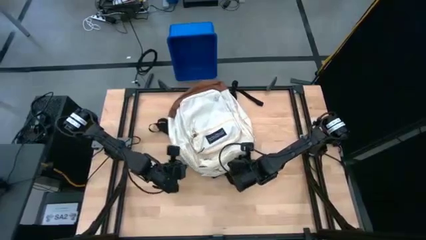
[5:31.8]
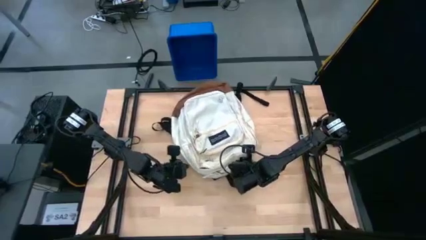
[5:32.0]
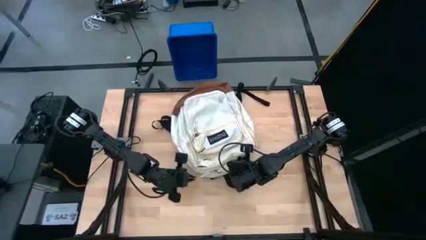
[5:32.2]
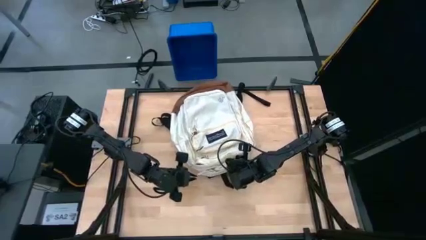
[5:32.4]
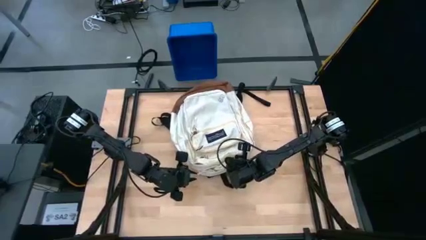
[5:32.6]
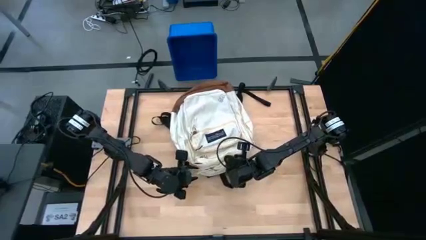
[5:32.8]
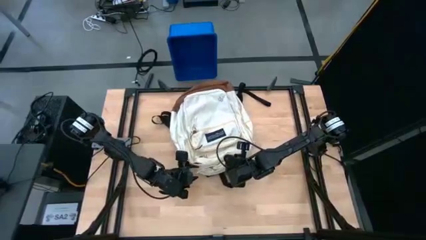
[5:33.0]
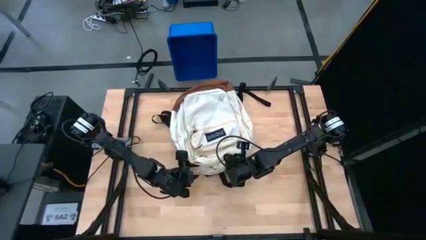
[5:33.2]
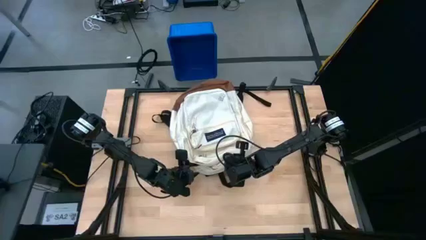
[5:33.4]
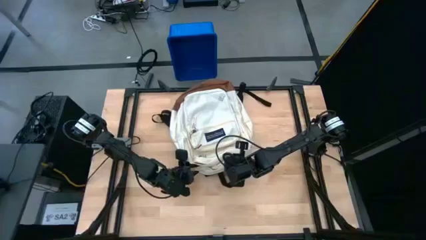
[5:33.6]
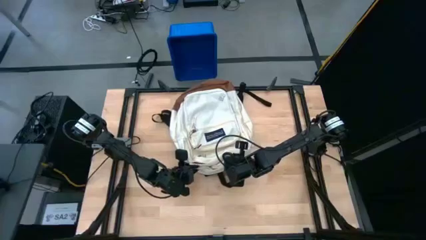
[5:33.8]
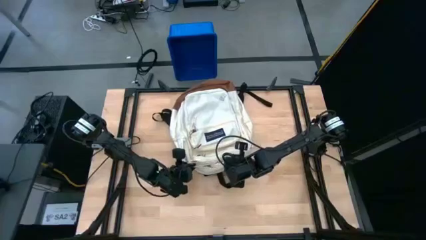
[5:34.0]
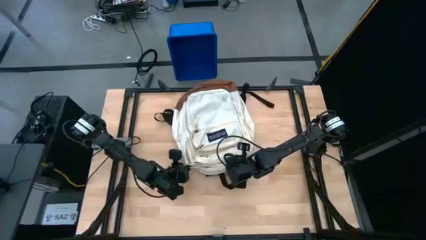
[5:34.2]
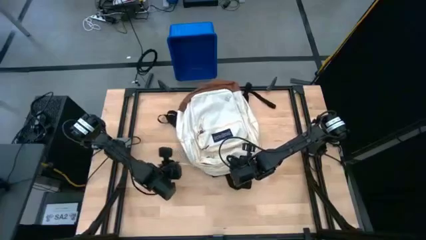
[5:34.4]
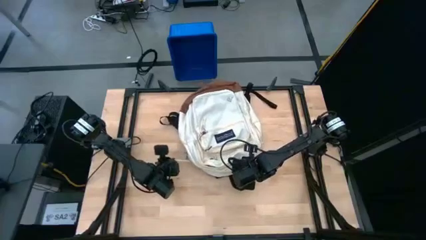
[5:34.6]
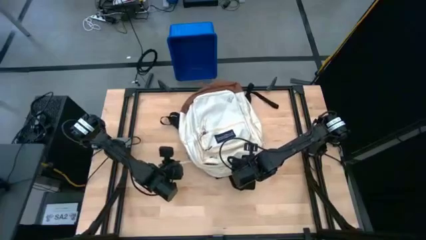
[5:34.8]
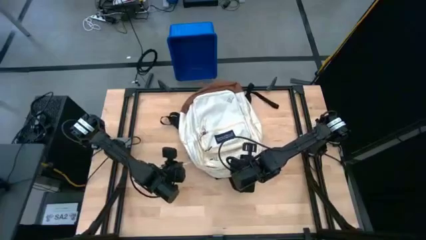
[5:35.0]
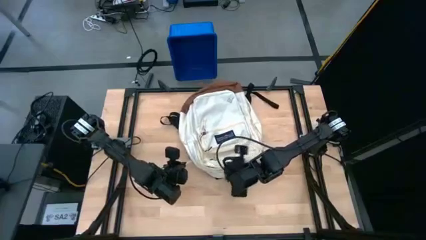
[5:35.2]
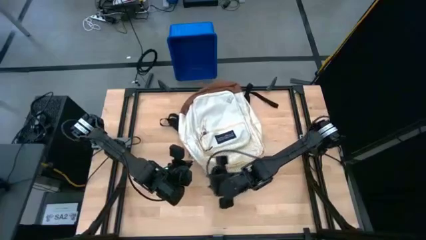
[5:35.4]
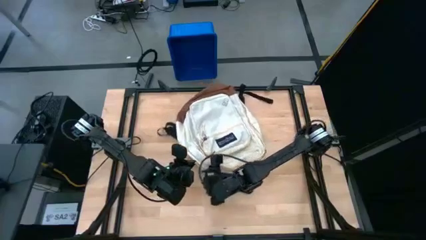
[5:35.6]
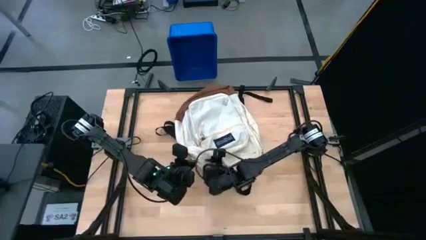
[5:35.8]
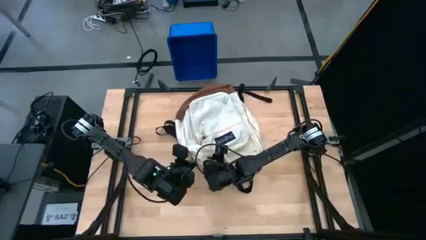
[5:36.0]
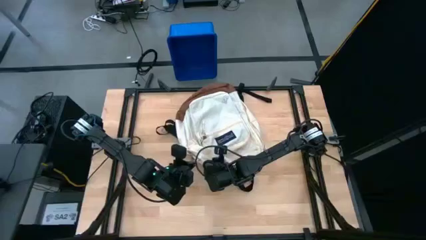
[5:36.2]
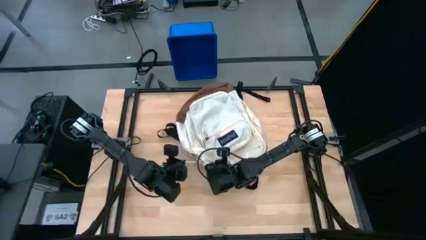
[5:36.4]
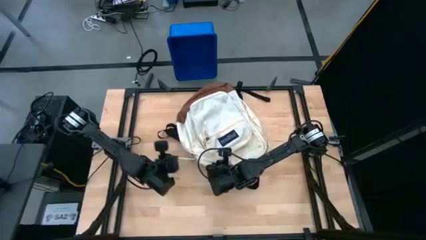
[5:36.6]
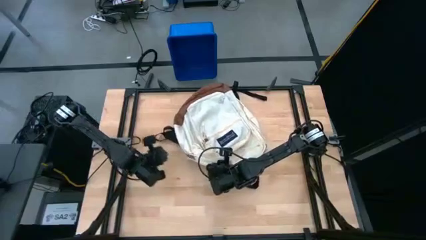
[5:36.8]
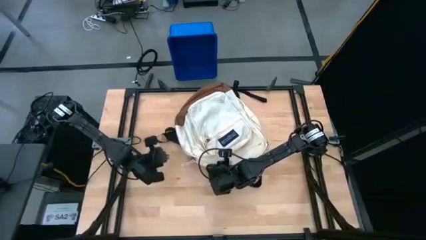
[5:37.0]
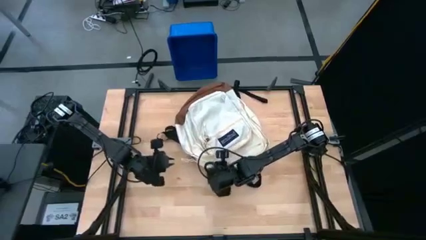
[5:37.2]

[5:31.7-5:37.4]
Task: Unpack backpack
Close the white backpack

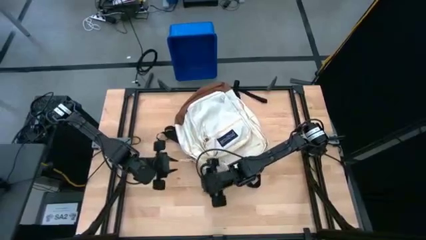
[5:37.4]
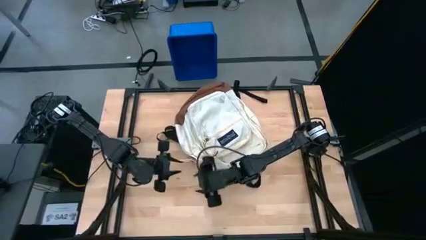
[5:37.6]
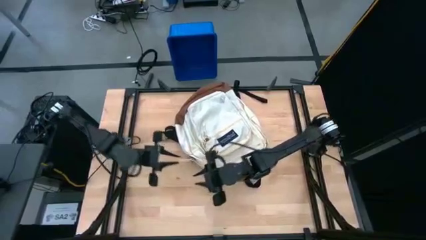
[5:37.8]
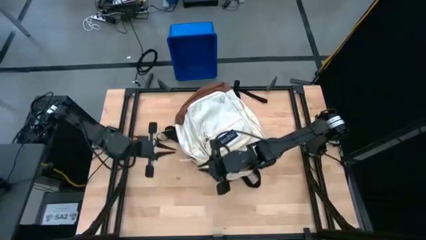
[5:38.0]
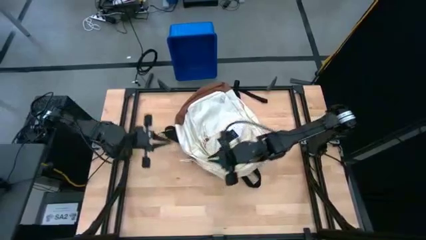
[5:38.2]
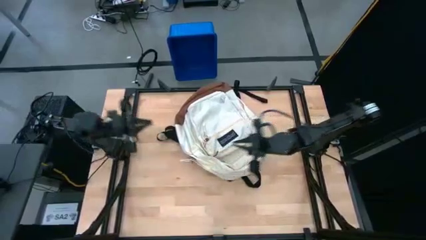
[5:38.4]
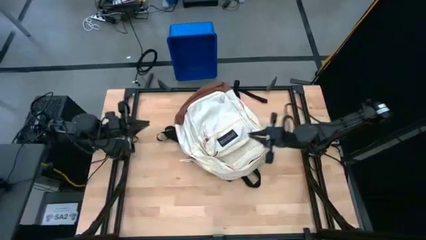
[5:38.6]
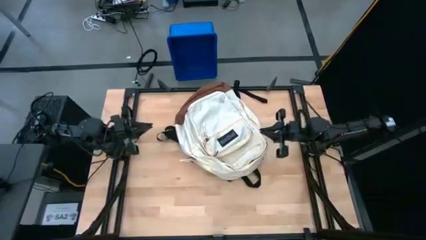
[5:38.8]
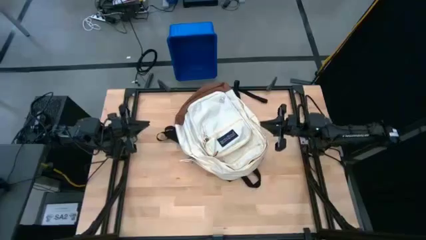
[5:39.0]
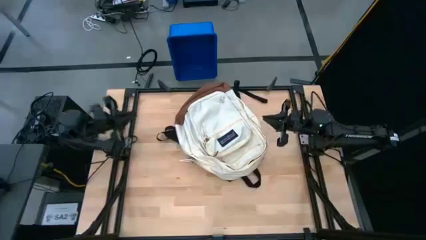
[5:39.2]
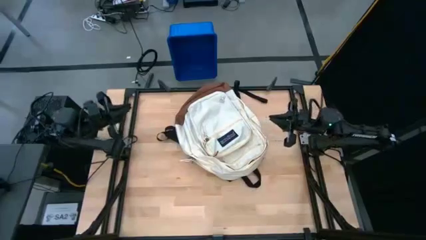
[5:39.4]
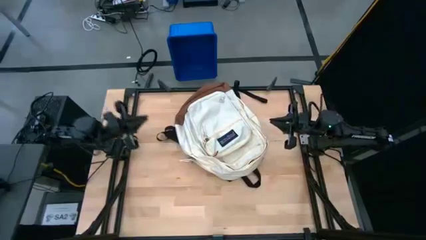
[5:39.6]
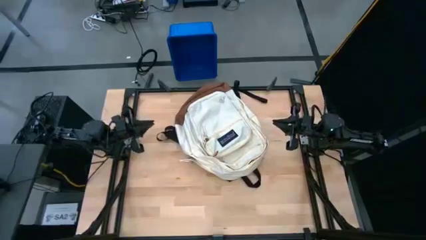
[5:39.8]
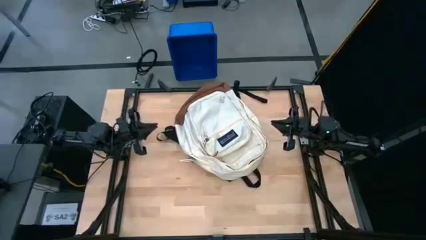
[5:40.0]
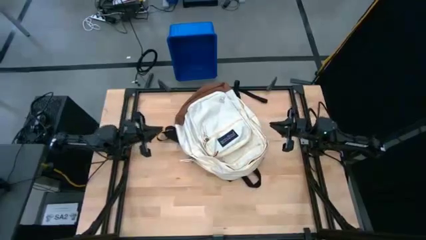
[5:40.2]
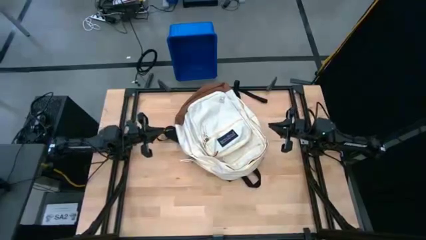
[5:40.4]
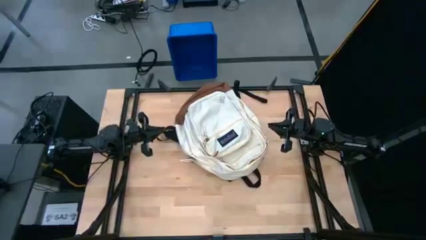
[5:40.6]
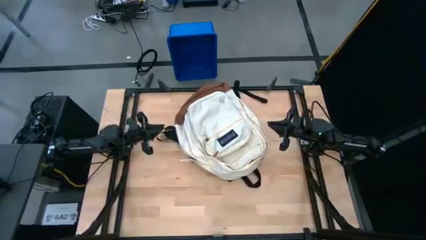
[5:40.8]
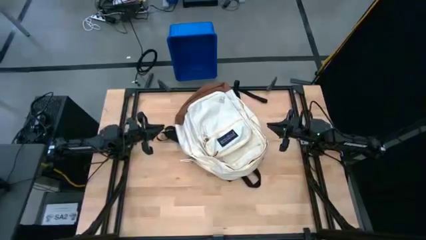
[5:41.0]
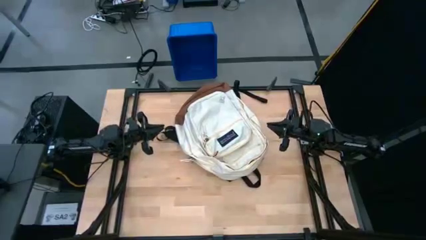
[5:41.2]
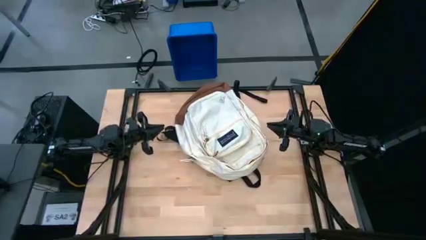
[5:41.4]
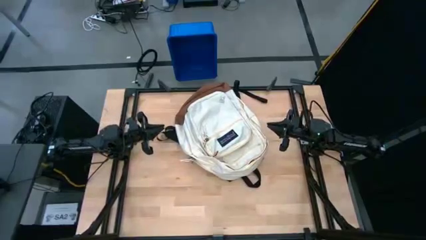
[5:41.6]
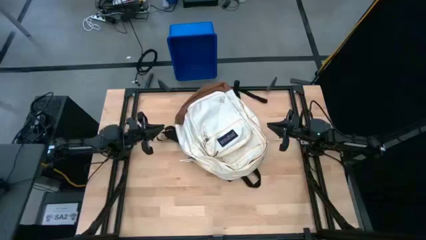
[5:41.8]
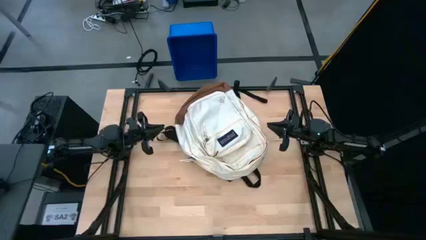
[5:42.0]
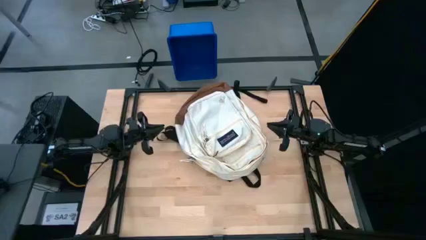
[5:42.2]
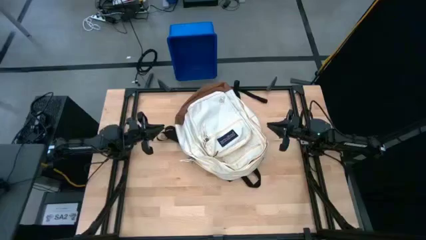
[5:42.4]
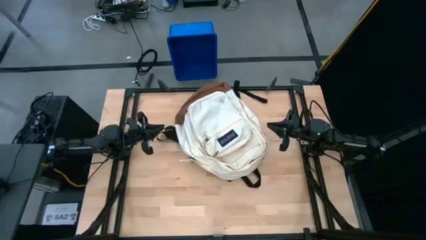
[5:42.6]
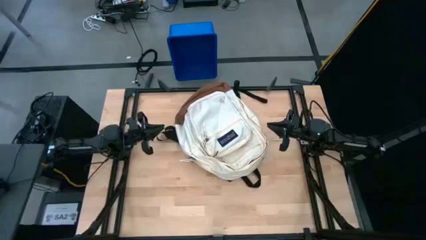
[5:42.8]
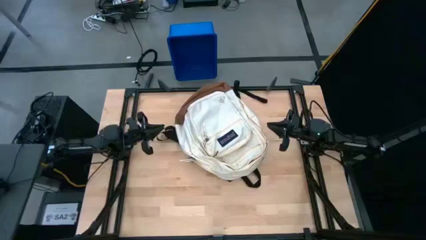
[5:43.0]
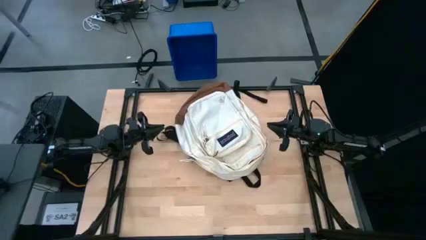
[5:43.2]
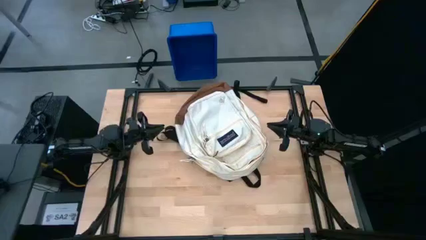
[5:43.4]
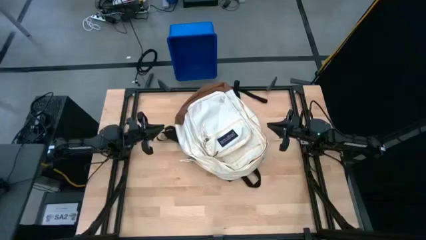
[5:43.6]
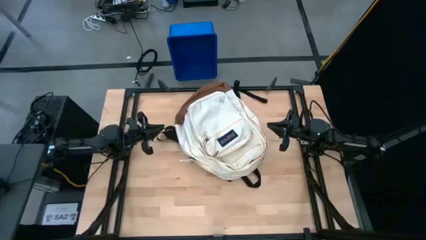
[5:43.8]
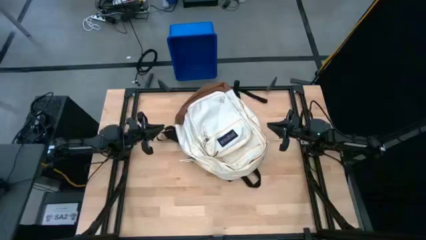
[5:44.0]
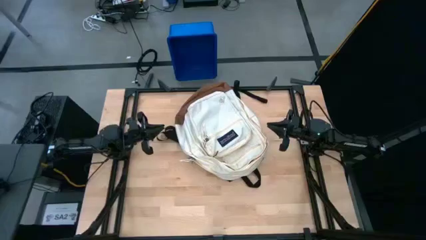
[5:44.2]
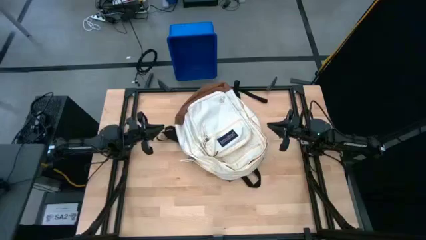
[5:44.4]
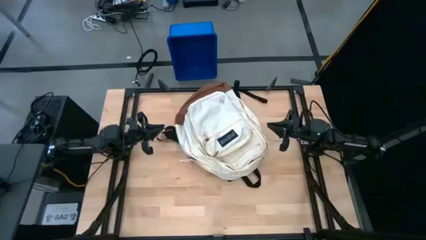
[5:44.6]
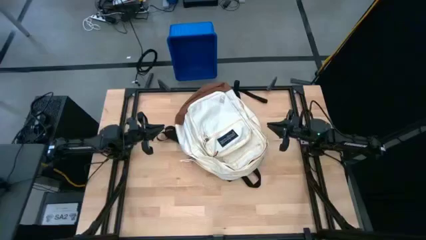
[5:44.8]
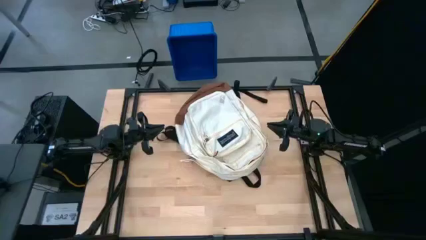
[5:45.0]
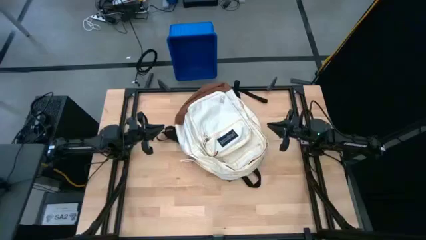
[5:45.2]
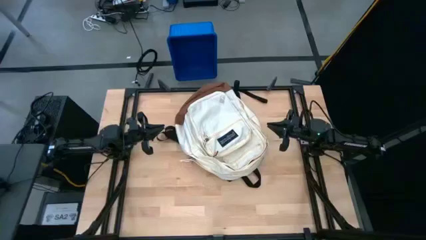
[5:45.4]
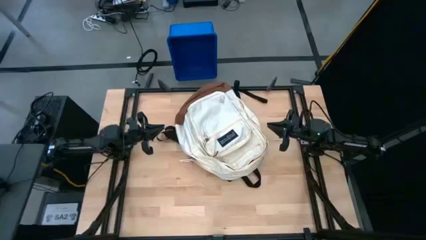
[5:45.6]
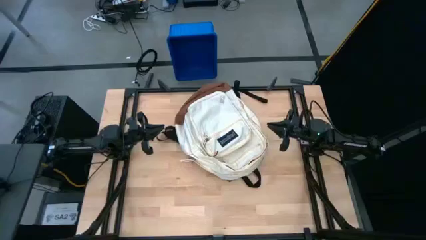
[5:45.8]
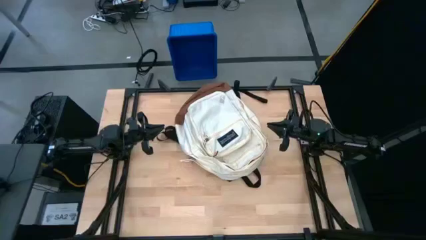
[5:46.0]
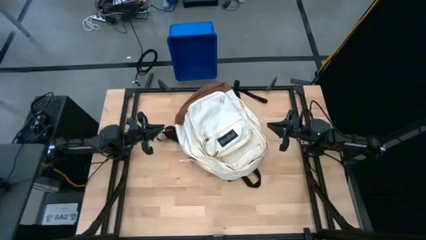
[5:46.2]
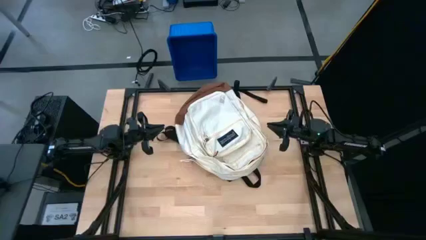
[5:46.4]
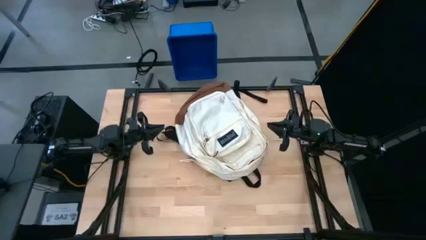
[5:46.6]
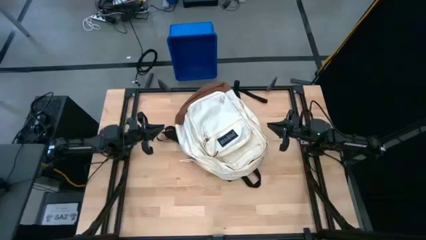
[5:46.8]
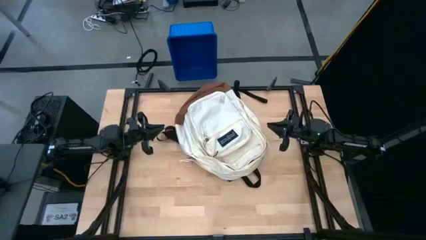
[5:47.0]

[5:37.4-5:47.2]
Return to Home Position
